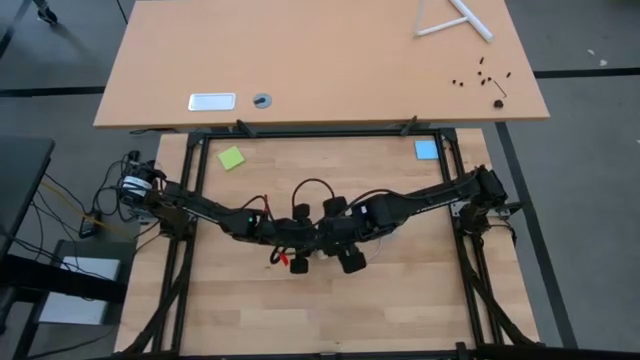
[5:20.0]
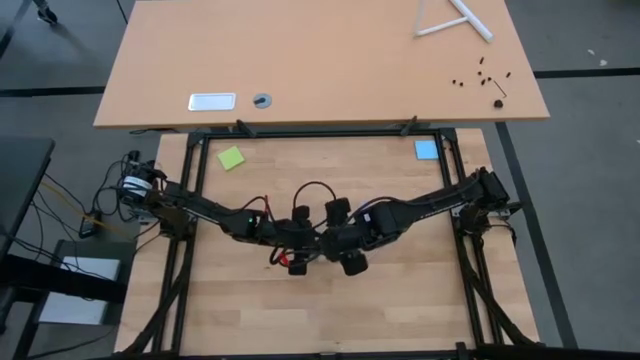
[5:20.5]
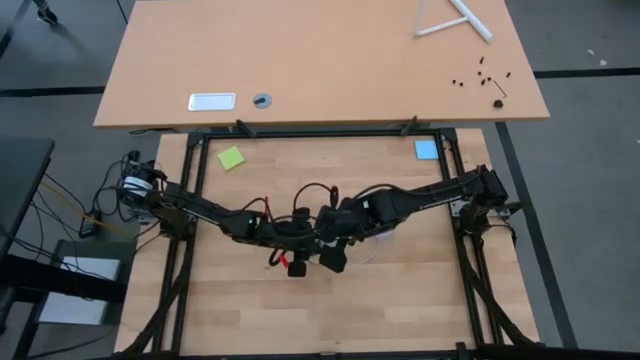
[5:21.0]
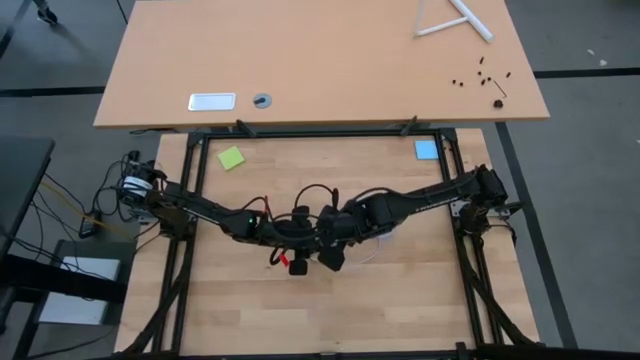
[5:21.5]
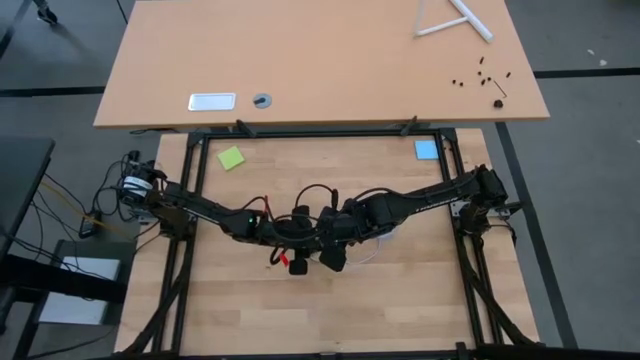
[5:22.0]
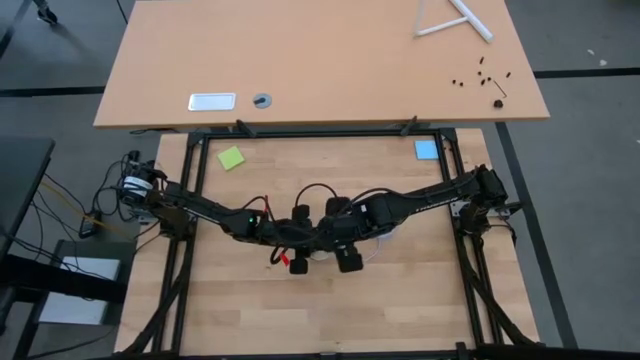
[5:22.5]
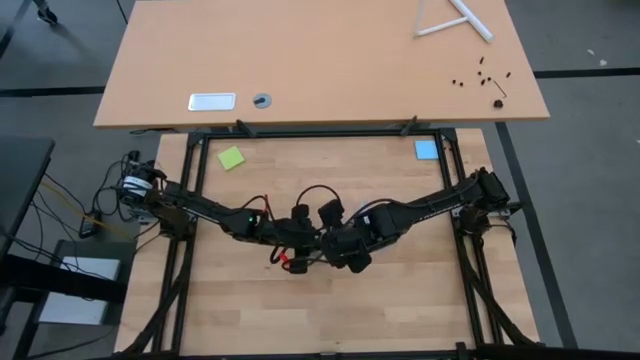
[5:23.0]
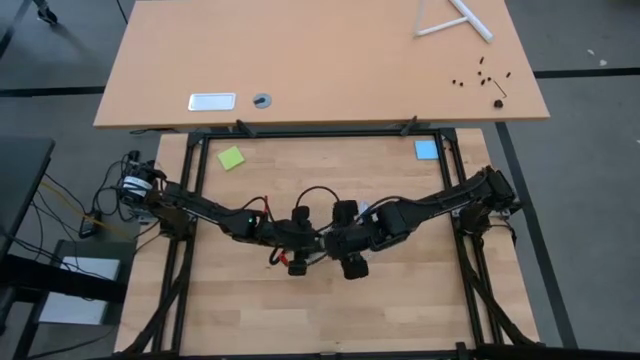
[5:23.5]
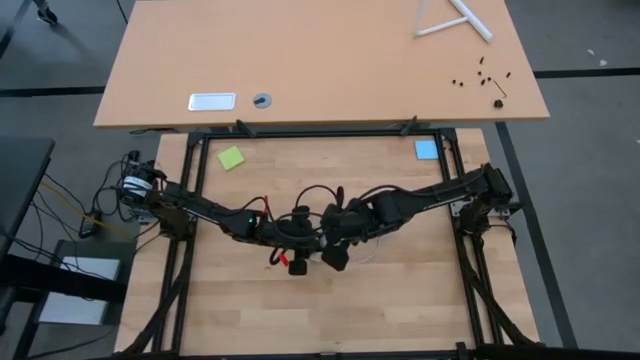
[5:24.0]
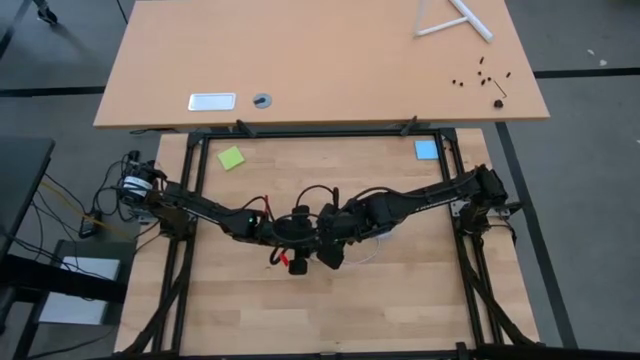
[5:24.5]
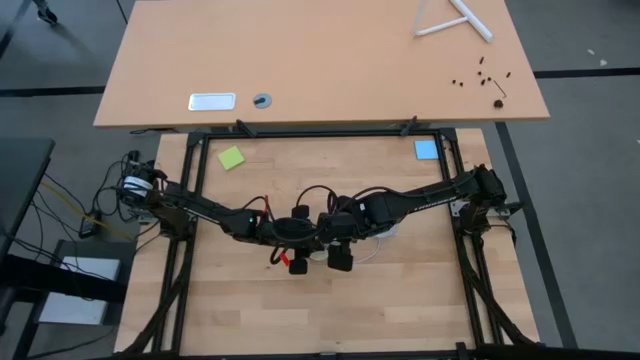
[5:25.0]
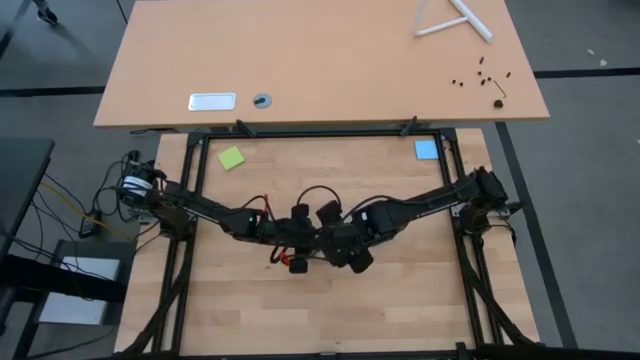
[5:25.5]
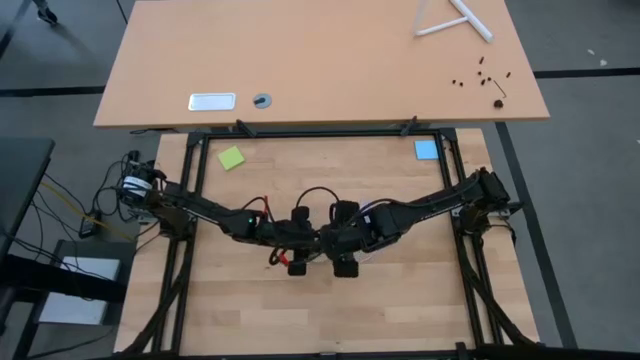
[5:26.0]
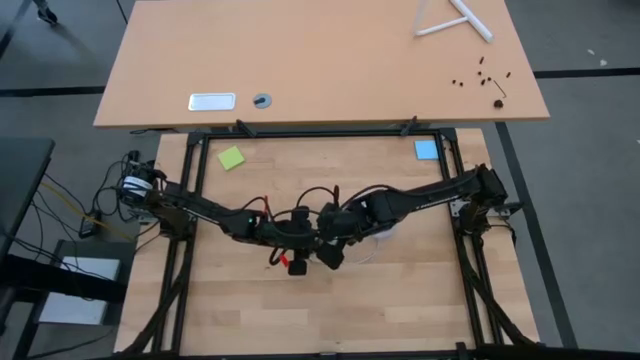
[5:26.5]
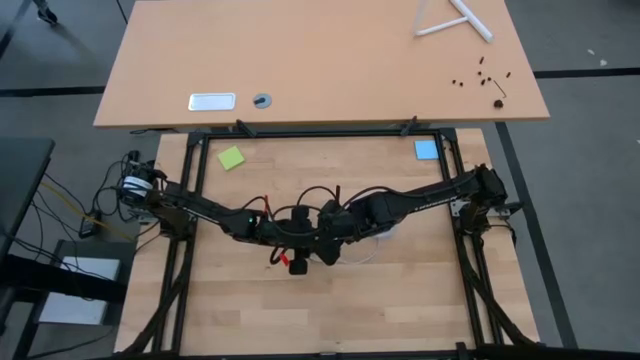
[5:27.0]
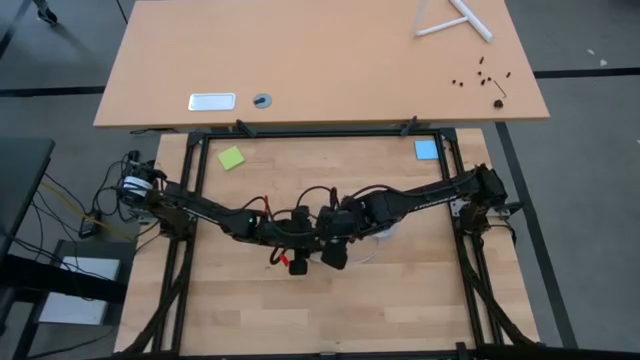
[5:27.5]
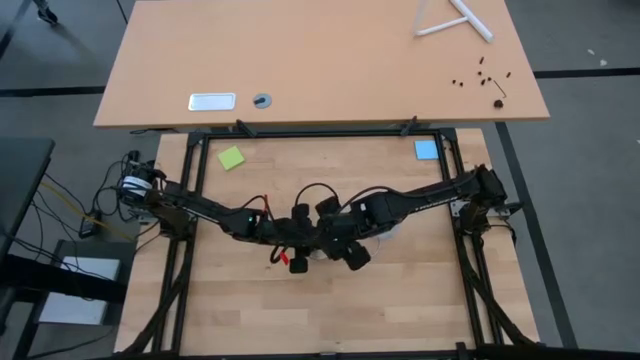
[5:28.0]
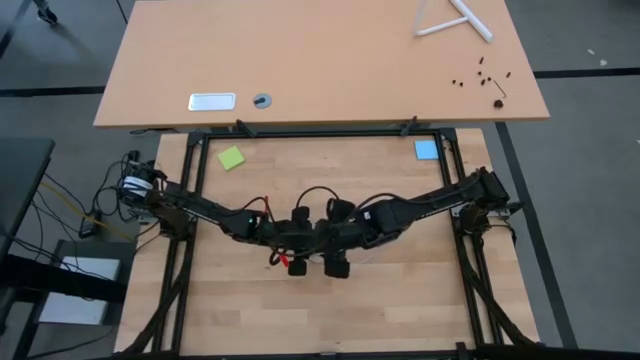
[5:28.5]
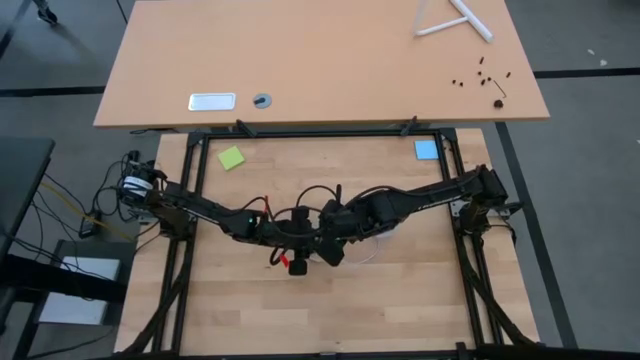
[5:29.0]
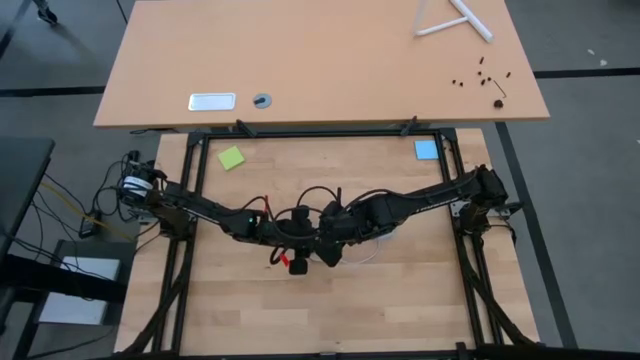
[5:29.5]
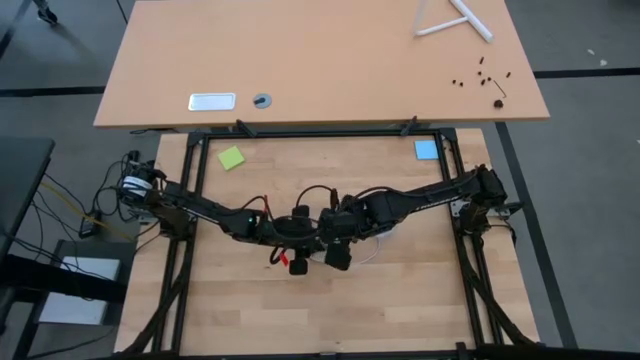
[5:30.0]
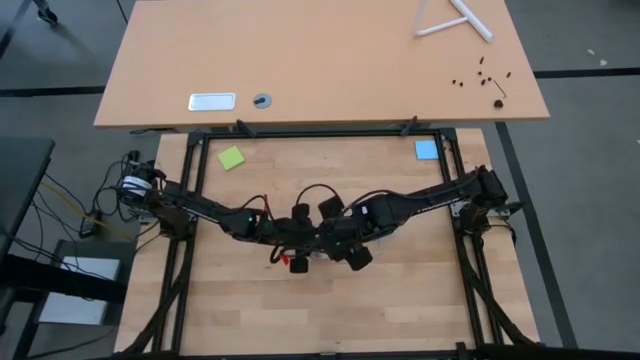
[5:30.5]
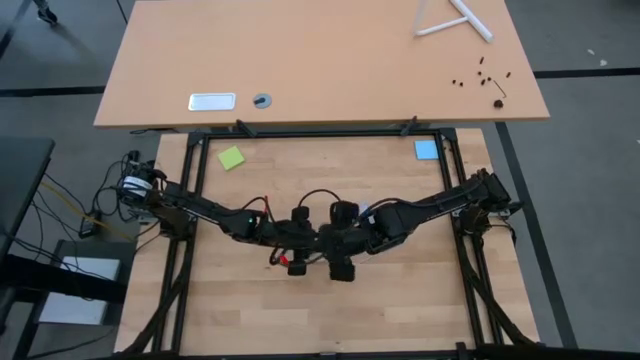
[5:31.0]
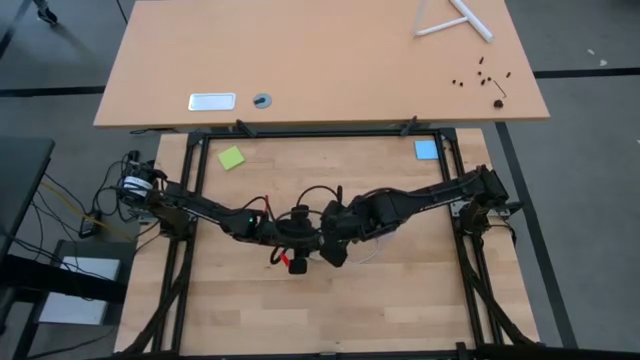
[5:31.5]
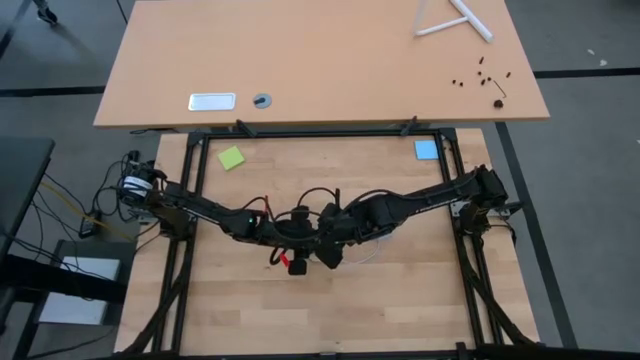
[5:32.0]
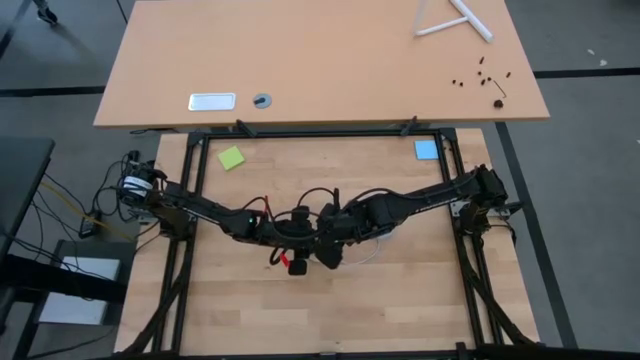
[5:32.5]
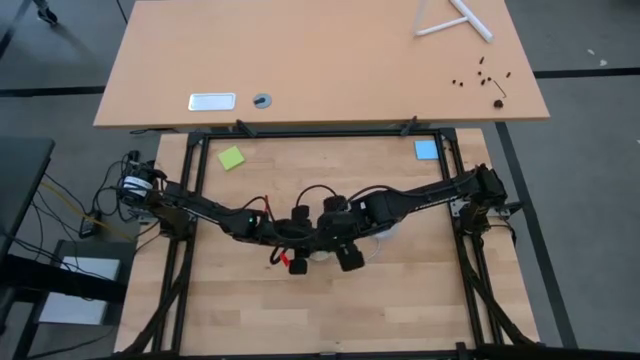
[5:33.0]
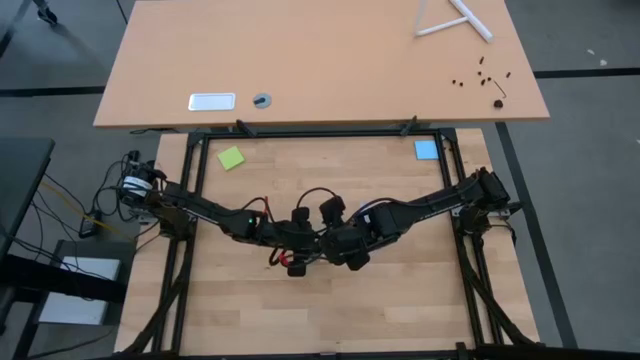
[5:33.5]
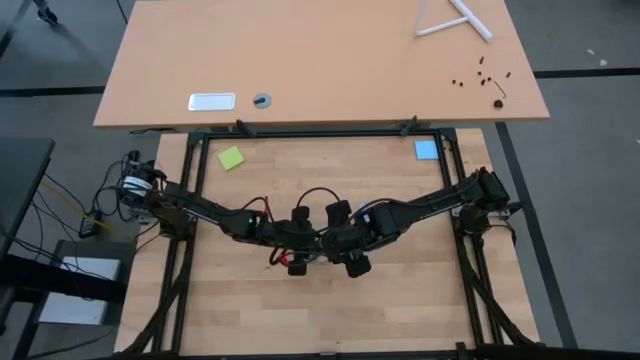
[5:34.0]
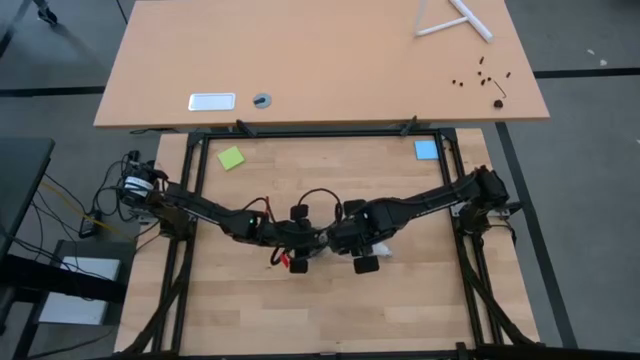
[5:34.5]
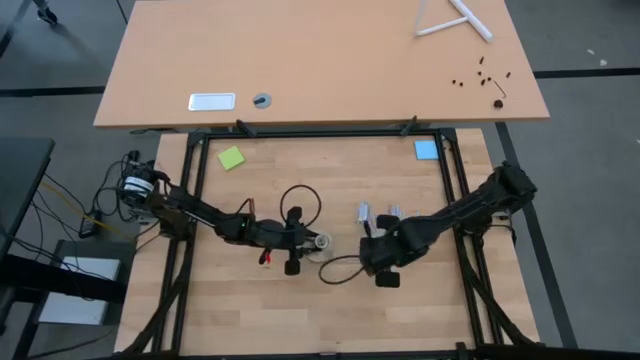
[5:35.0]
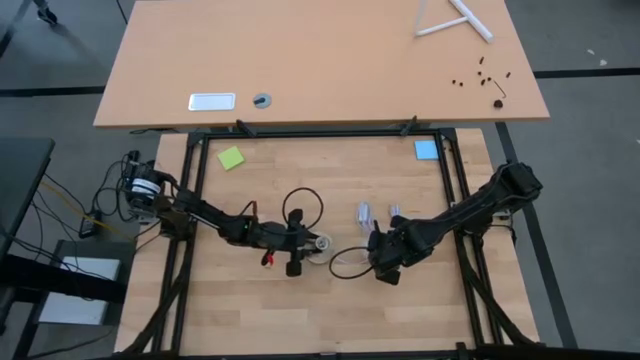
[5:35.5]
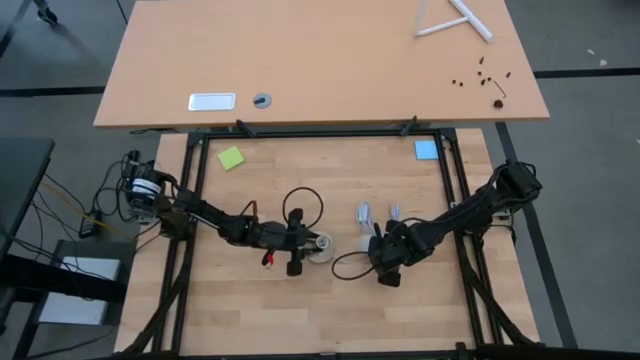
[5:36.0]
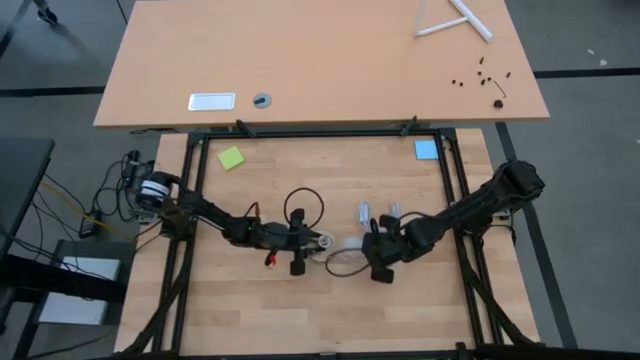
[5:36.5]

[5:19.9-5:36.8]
Task: Screw lightbulb
Remove the lightbulb from the lamp

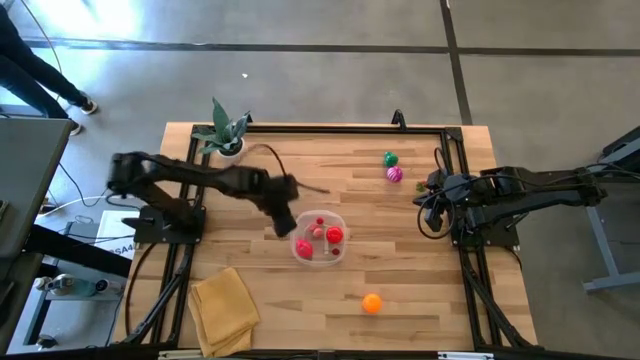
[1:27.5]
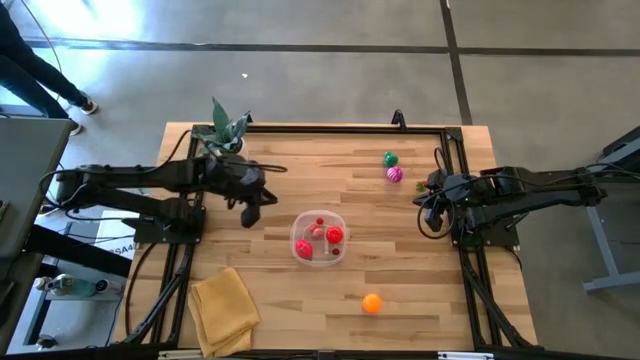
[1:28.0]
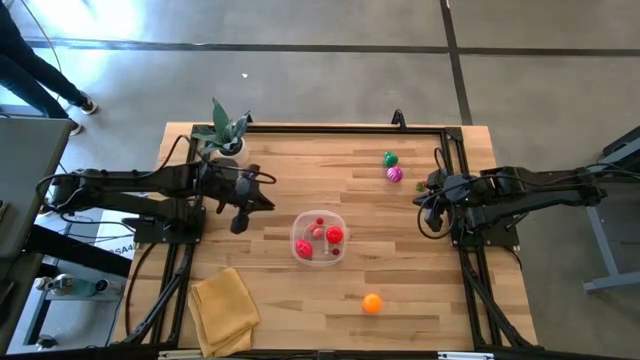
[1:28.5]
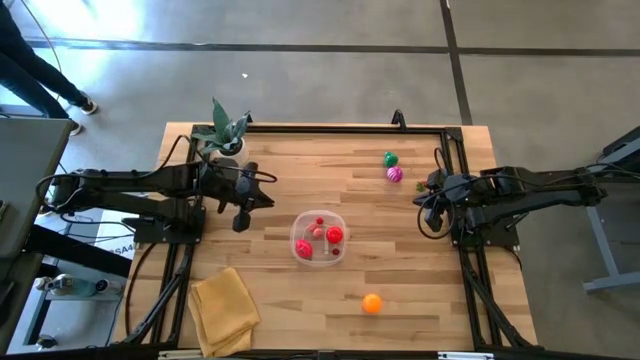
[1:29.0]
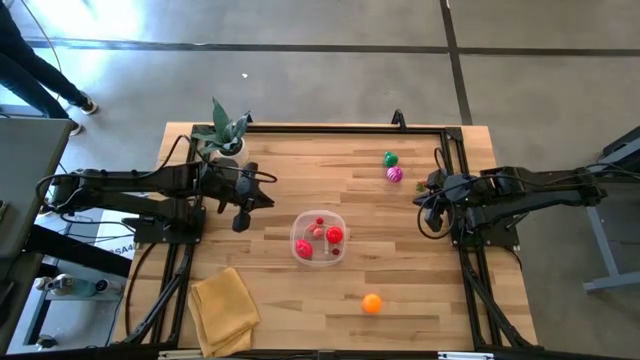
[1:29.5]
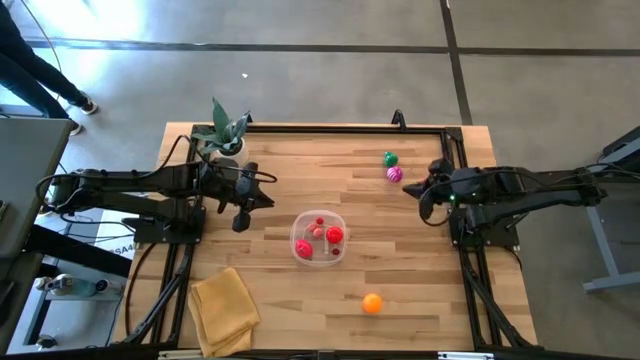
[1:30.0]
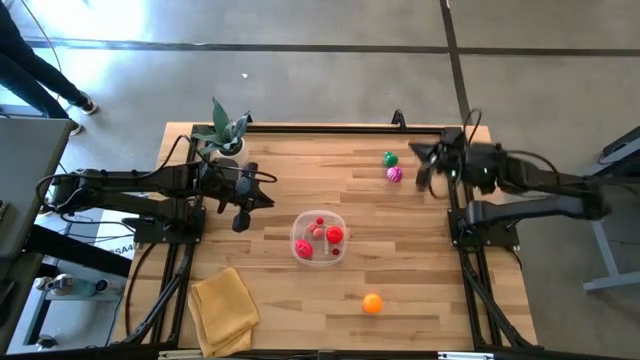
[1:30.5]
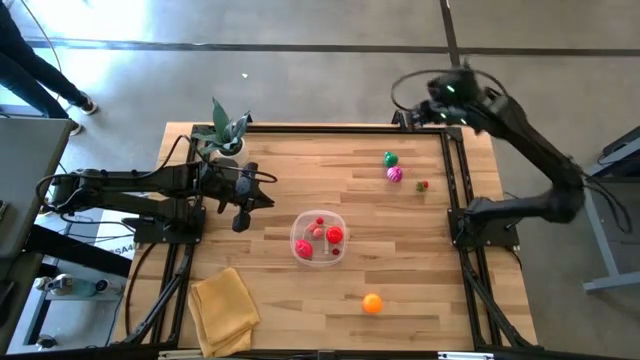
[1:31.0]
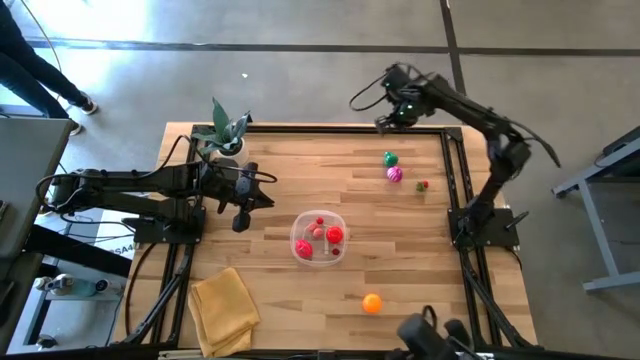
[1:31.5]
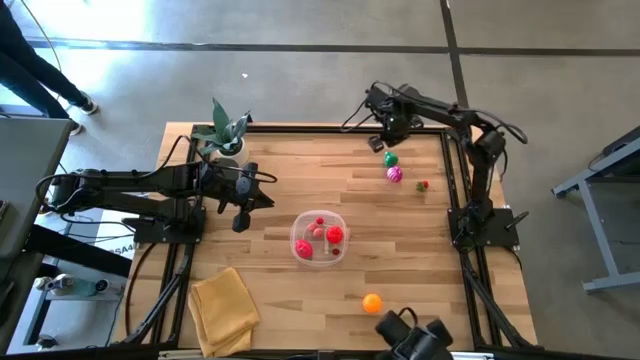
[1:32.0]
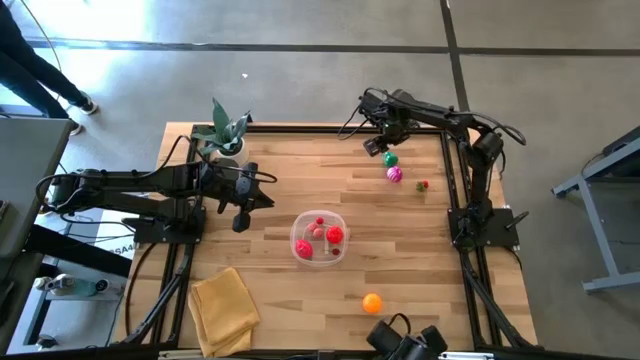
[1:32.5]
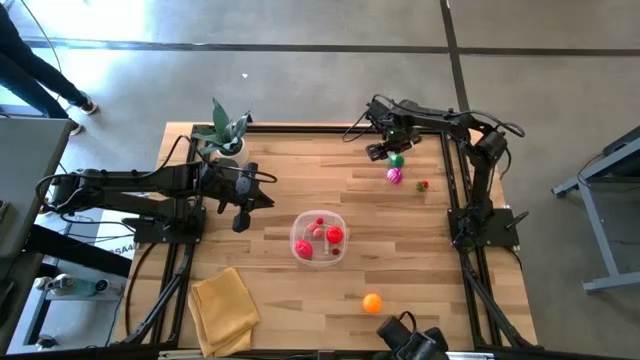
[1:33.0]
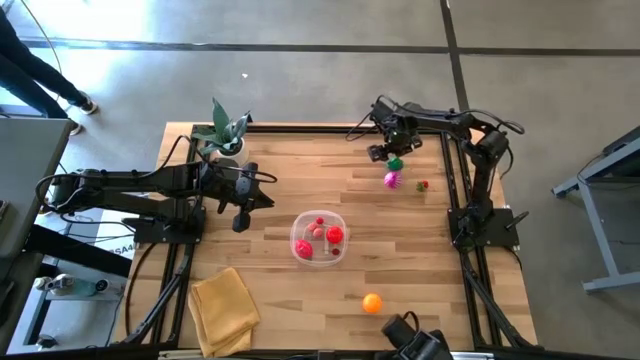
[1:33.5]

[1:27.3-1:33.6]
Task: Pick and placing Produce into tupperware
Put the green bell pepper into the transparent container
